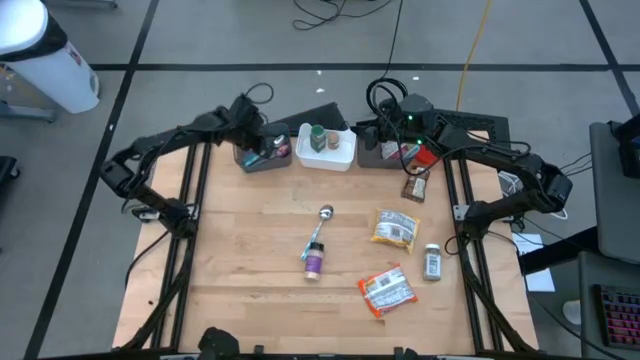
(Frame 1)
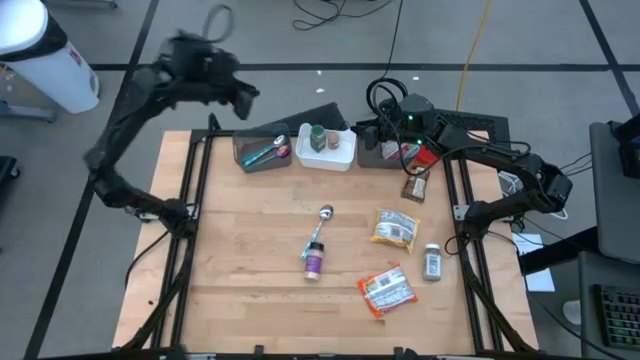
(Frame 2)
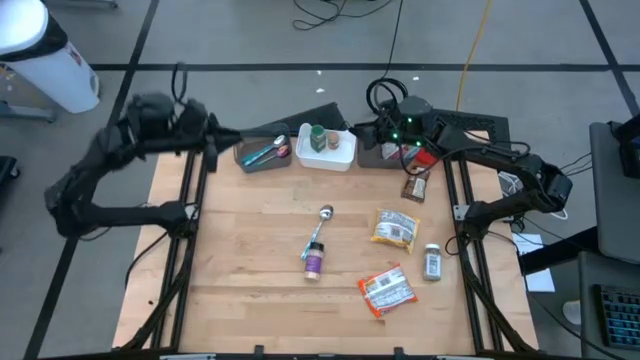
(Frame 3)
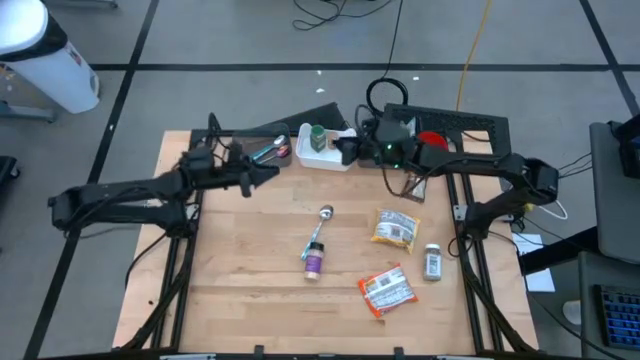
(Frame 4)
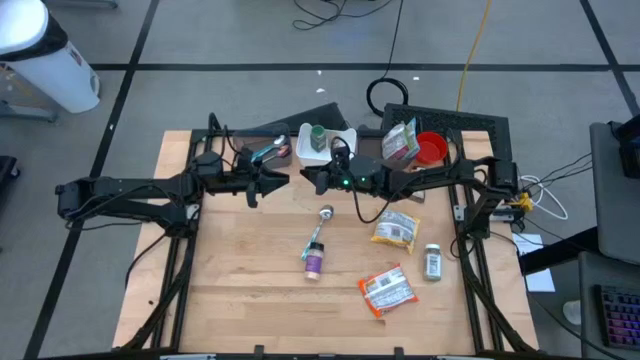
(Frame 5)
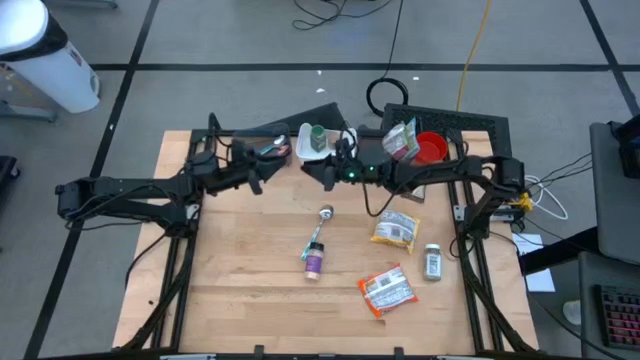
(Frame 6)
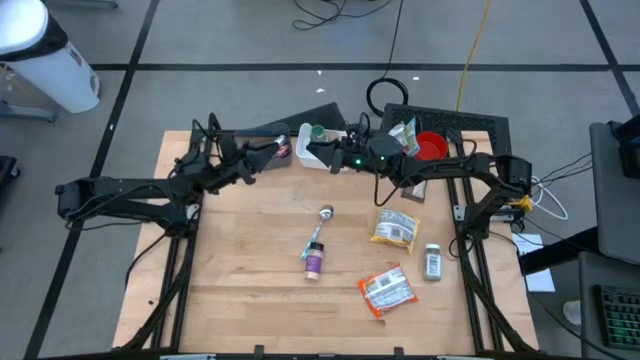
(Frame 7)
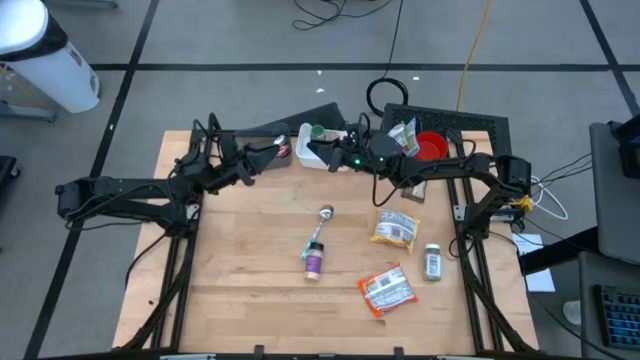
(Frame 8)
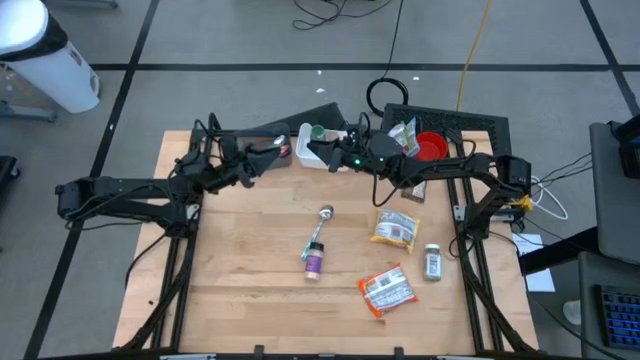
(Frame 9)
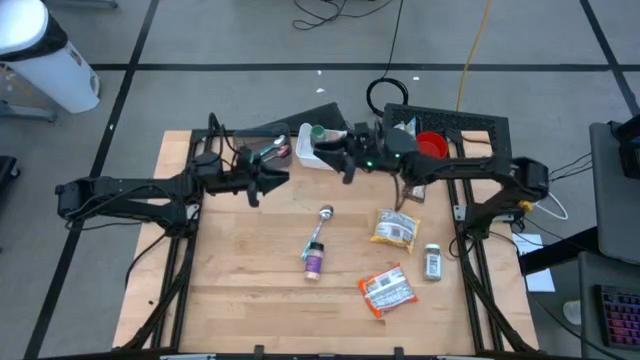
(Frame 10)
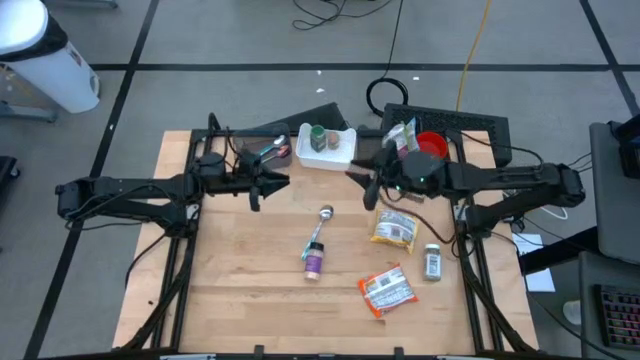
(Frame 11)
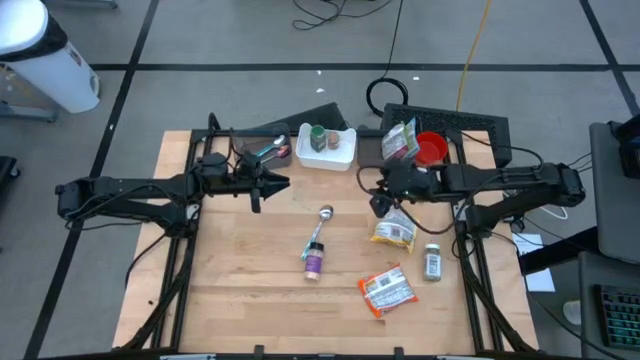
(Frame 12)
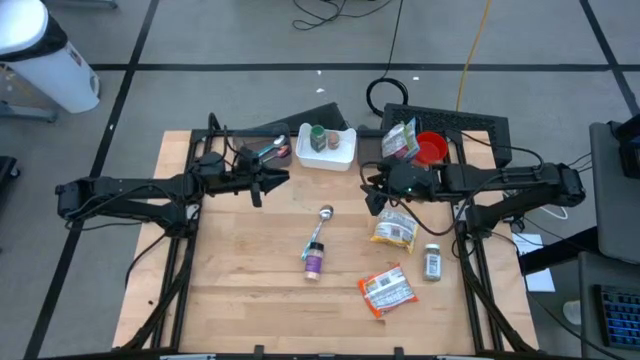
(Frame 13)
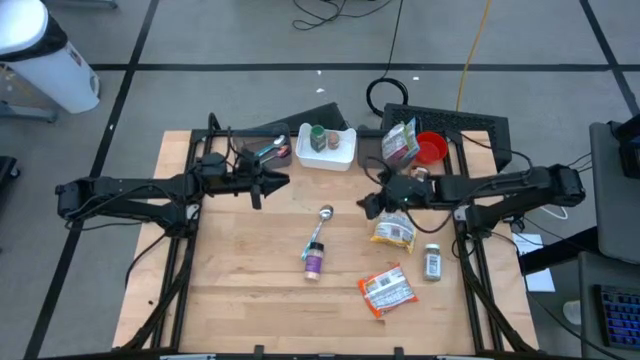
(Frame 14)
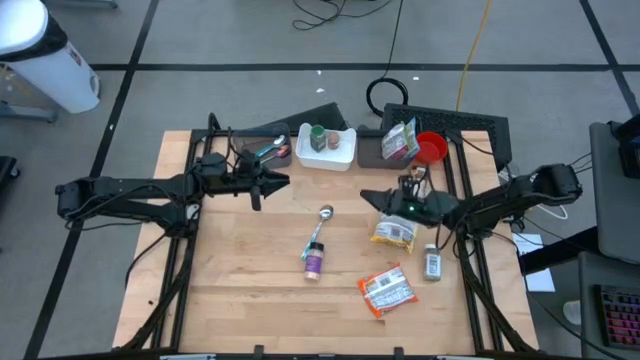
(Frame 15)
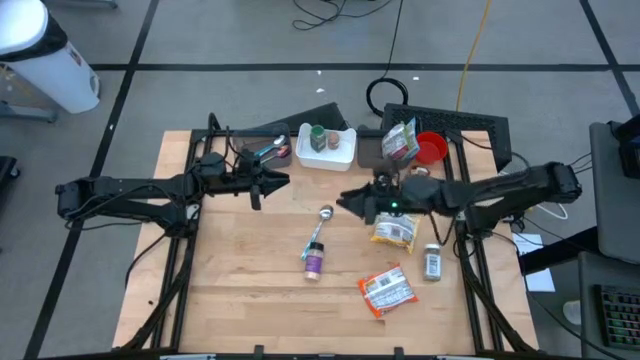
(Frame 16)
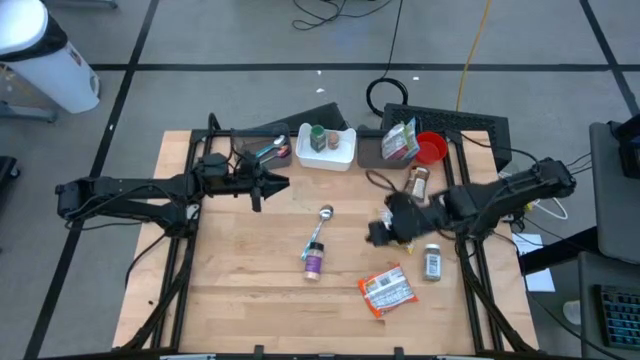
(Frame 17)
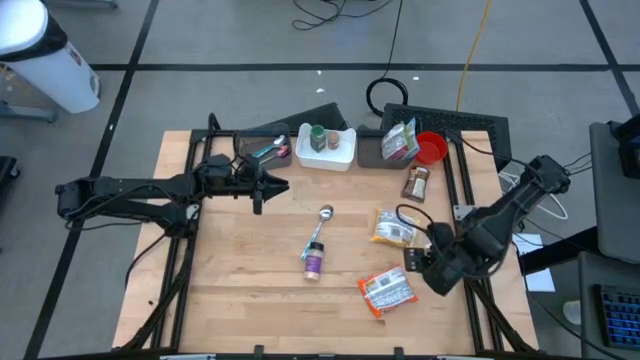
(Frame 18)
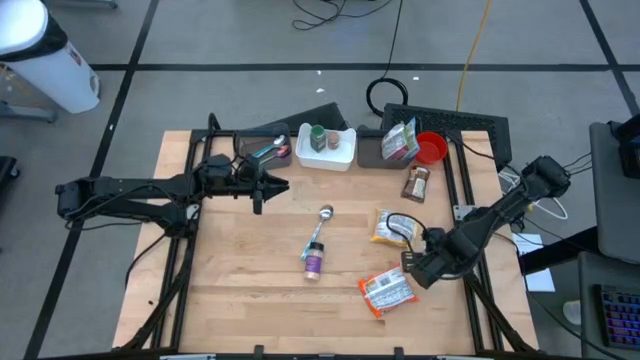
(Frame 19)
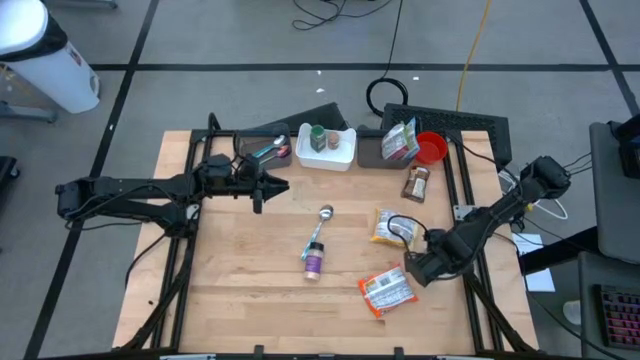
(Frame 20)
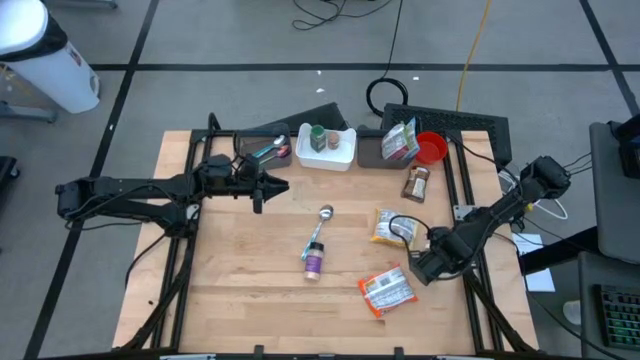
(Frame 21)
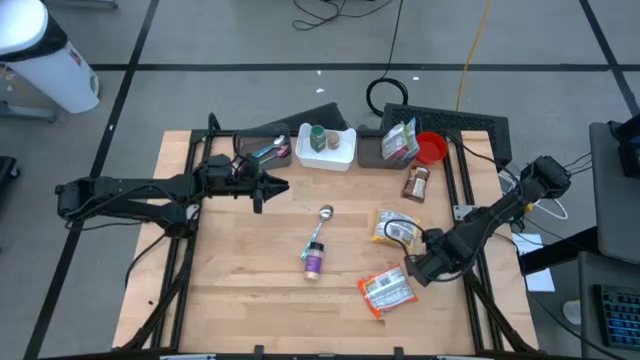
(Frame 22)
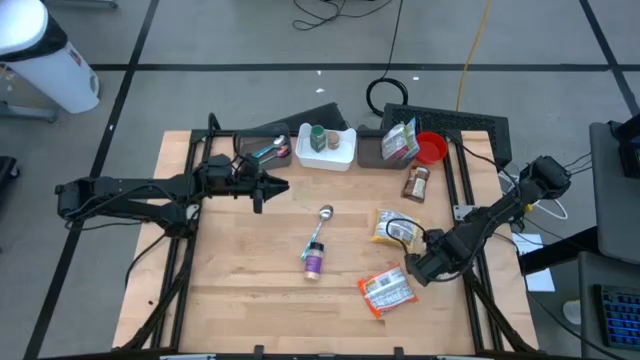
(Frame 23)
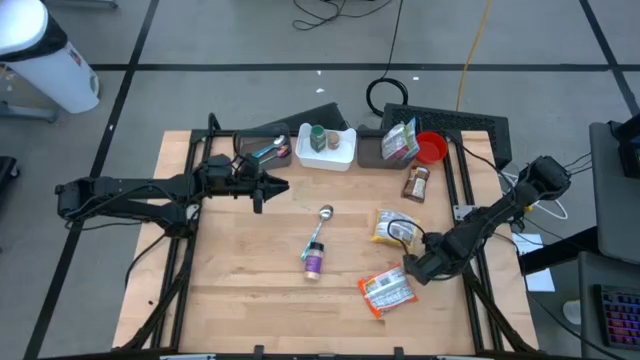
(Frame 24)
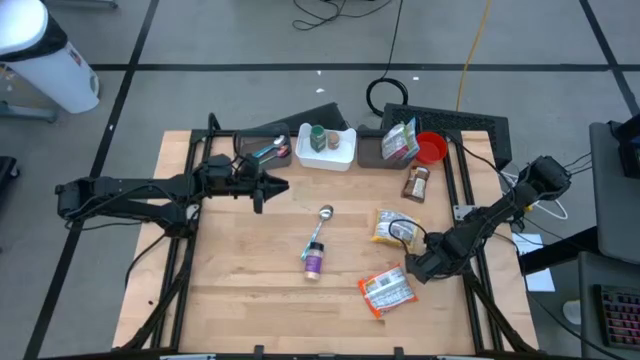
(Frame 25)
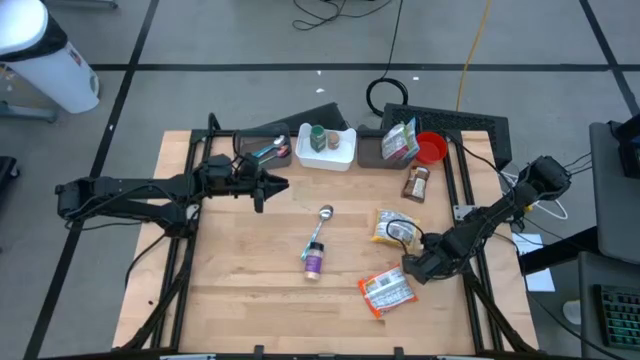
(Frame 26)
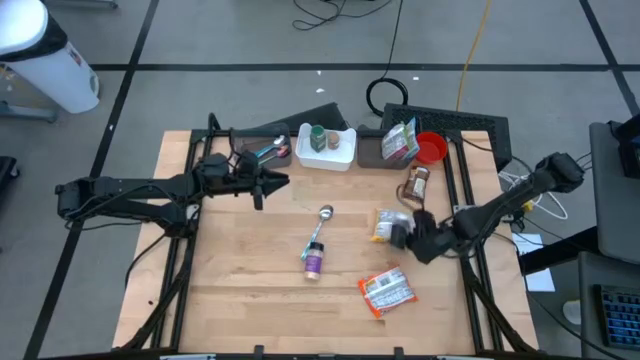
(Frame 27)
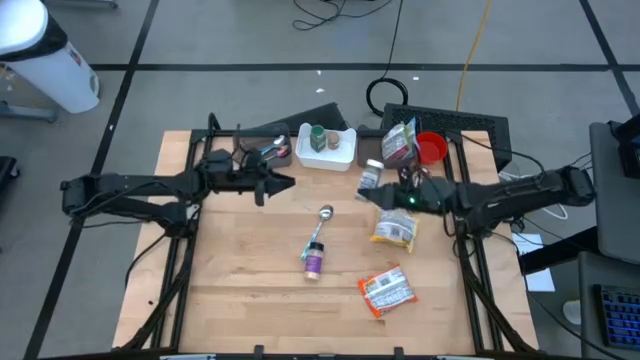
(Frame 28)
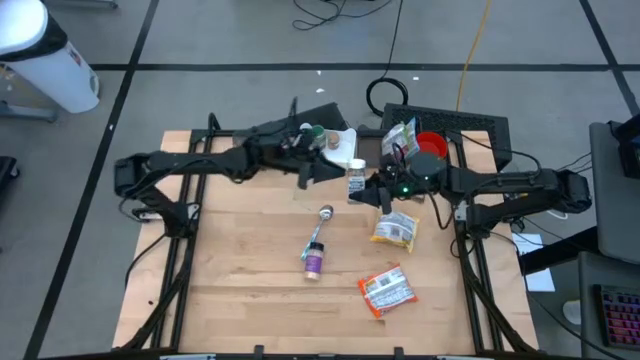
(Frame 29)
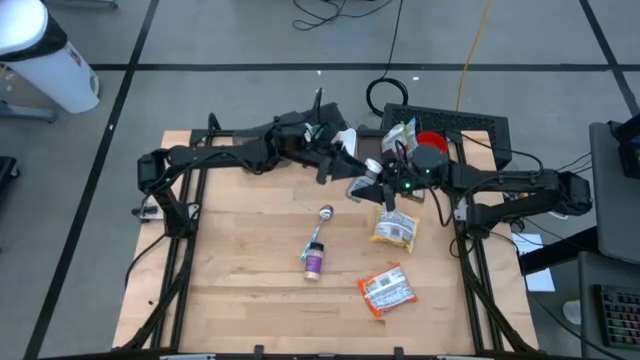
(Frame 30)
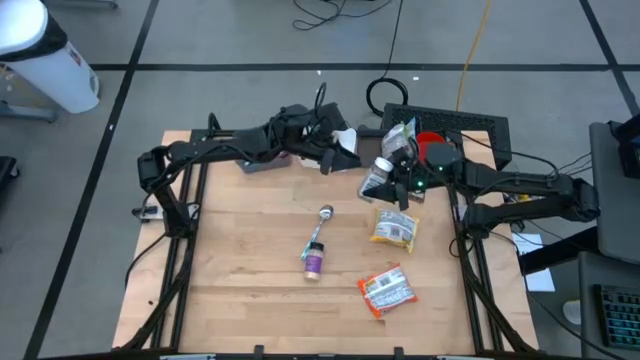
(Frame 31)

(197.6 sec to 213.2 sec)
Task: Pick & Place Food Item
Put the white seasoning bottle into the white bin

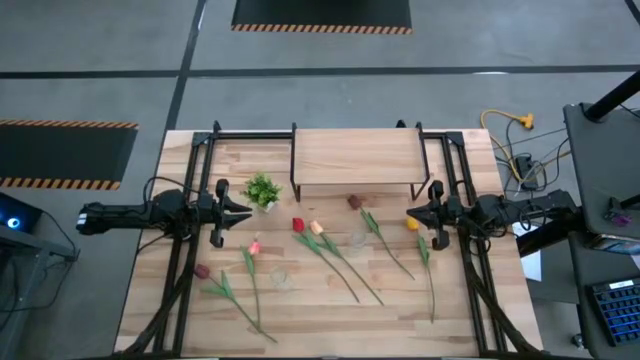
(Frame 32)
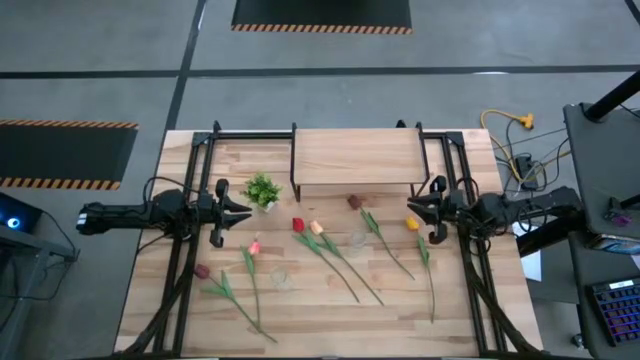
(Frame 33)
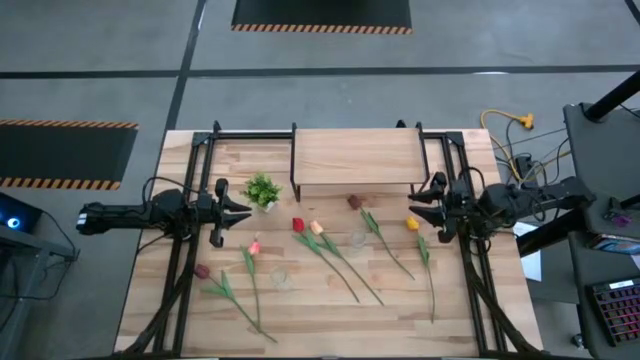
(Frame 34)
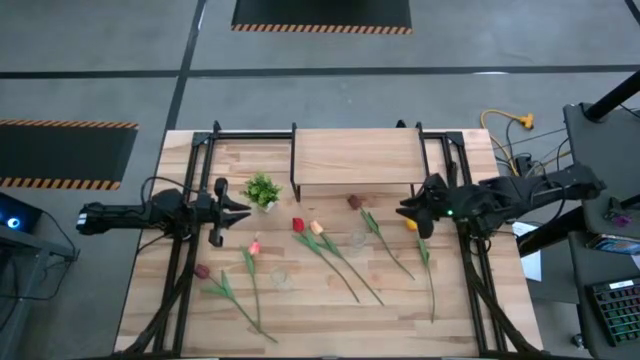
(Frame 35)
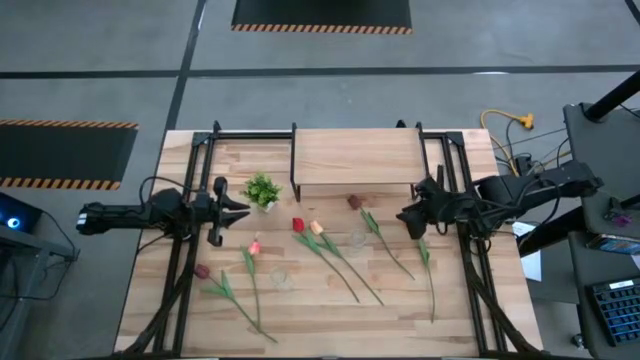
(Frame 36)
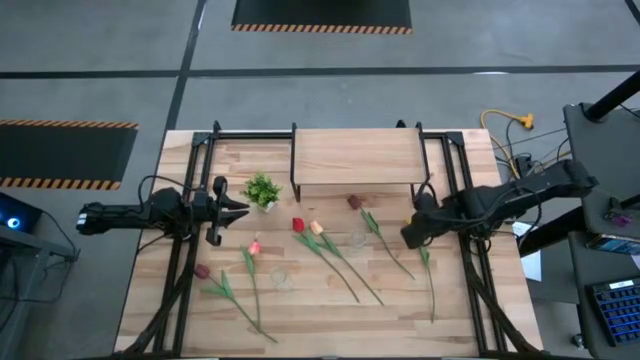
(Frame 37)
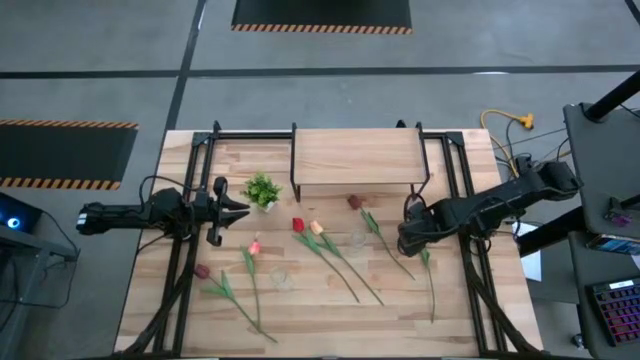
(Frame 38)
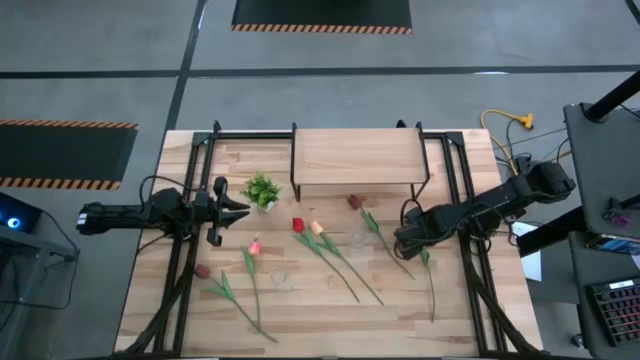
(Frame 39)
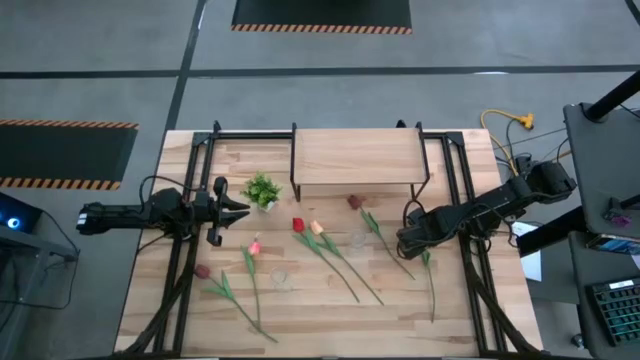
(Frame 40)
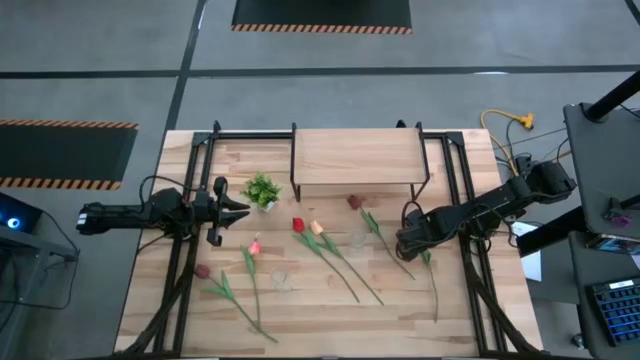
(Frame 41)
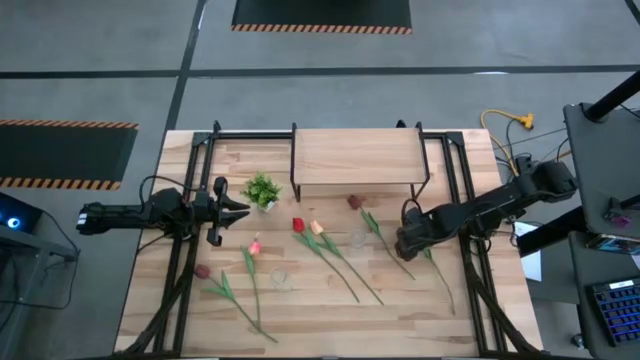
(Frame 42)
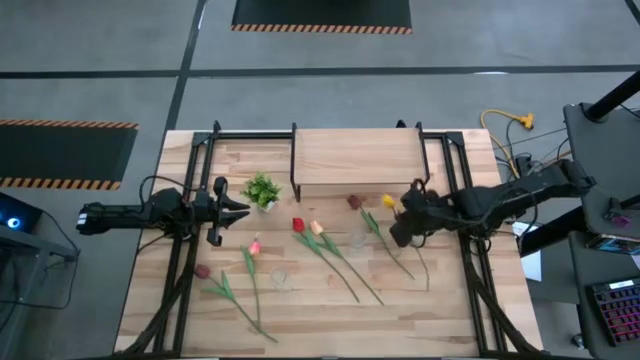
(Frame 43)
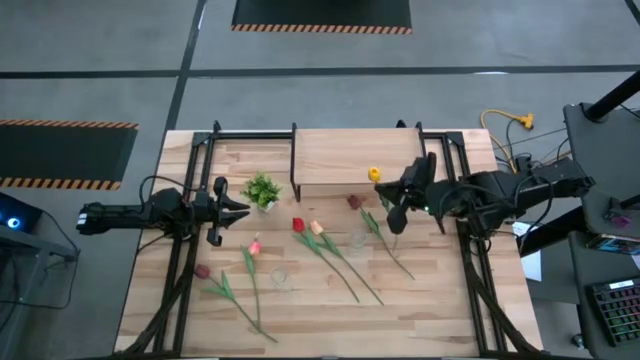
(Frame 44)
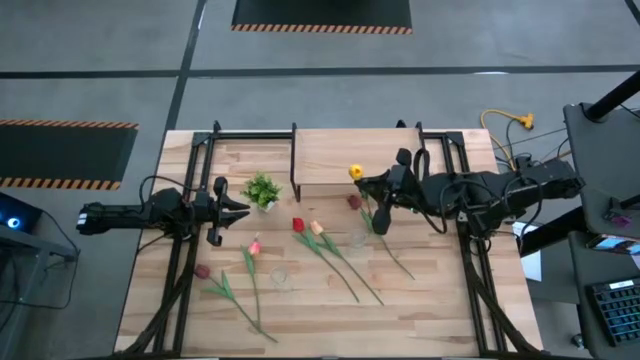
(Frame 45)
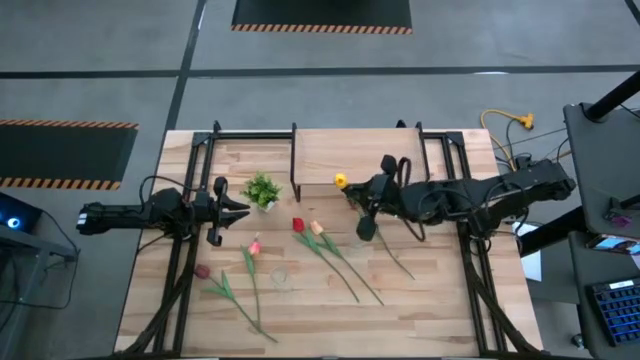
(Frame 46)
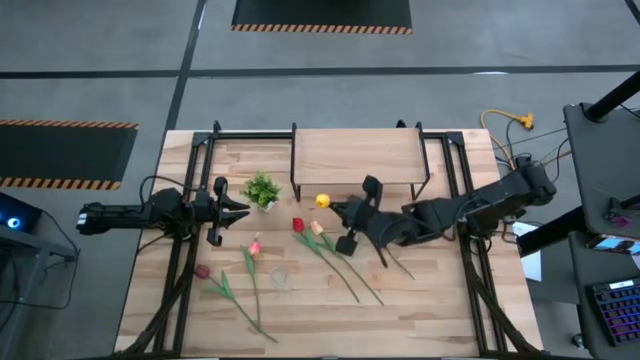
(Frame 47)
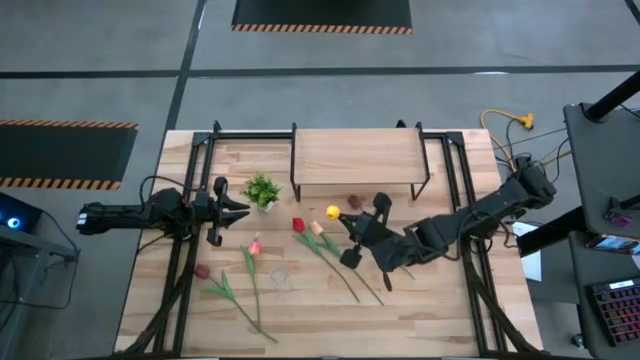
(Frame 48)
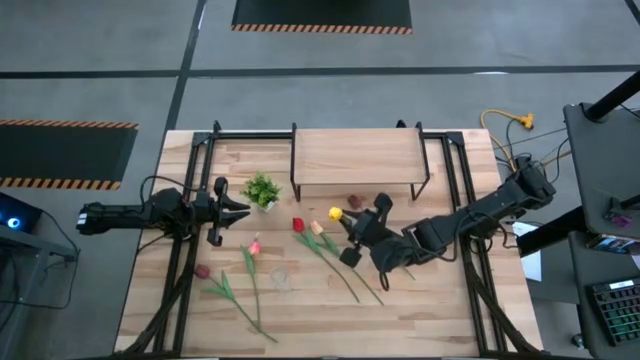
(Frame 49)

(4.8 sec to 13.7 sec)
Task: Pick and place flowers into a vace then onto a shelf
Put the yellow tulip into the right transparent vase
